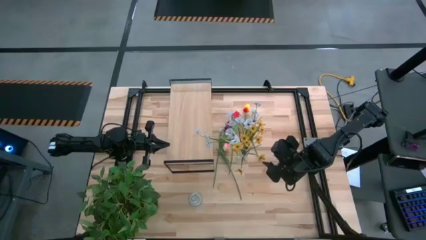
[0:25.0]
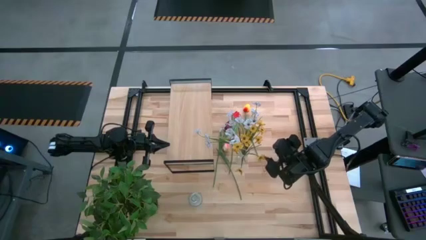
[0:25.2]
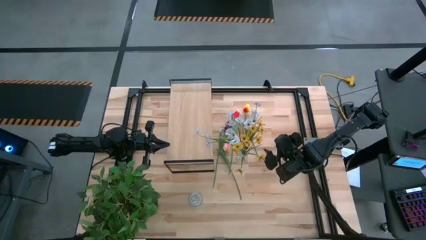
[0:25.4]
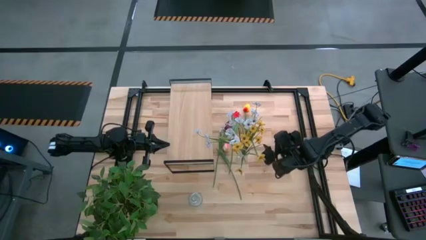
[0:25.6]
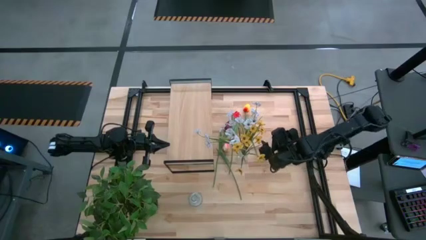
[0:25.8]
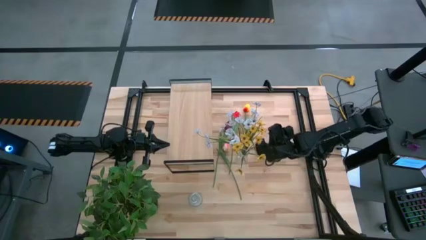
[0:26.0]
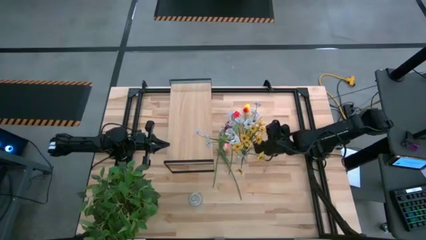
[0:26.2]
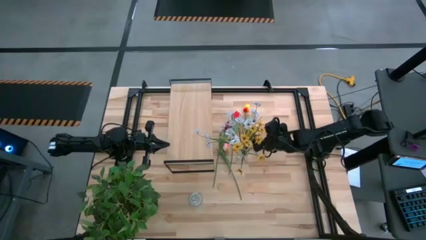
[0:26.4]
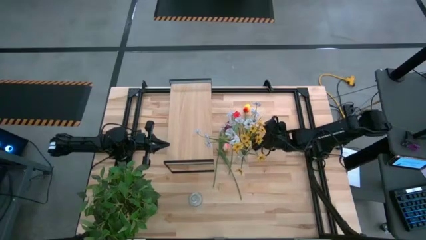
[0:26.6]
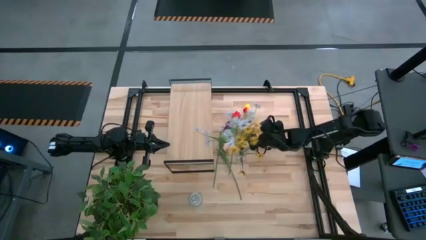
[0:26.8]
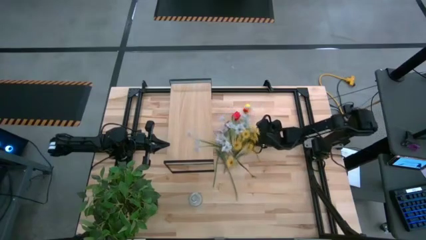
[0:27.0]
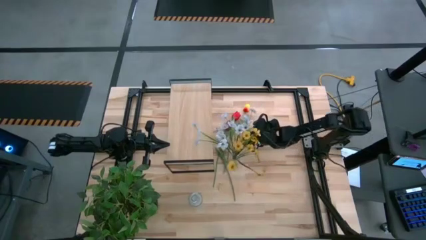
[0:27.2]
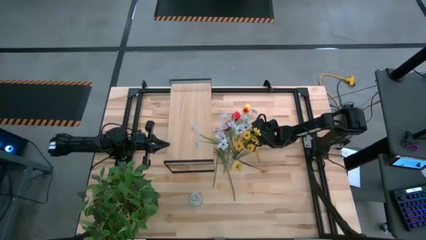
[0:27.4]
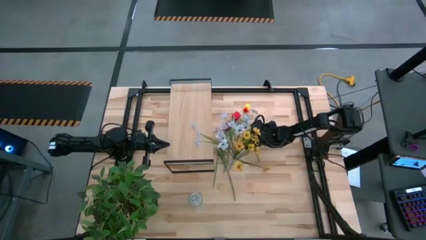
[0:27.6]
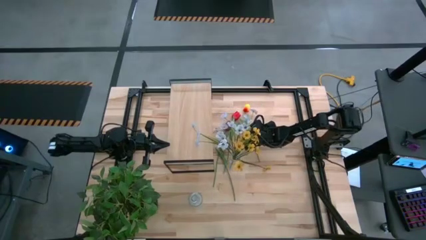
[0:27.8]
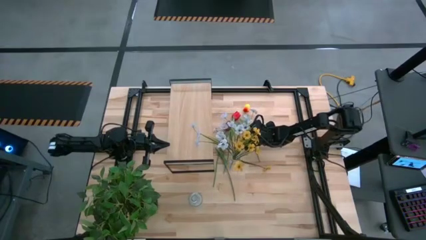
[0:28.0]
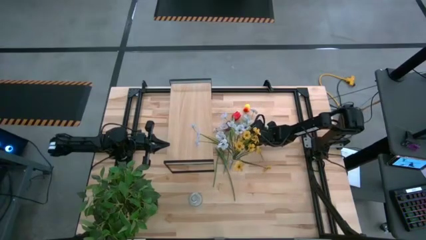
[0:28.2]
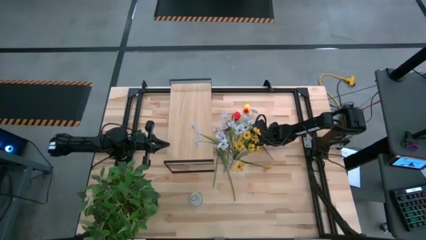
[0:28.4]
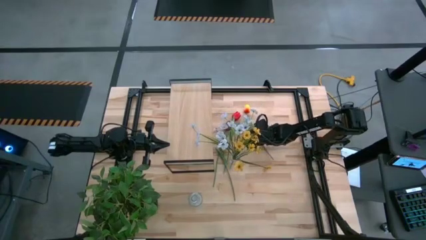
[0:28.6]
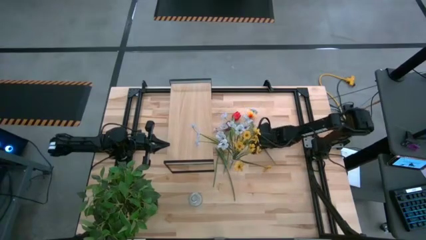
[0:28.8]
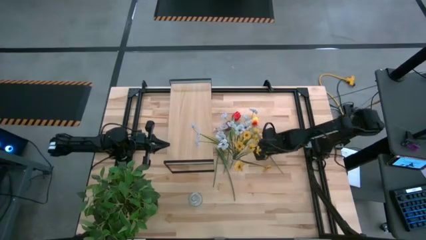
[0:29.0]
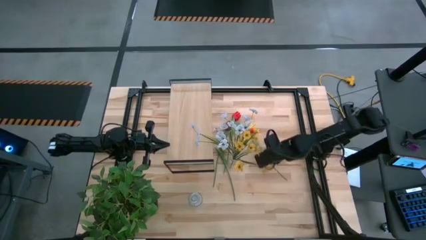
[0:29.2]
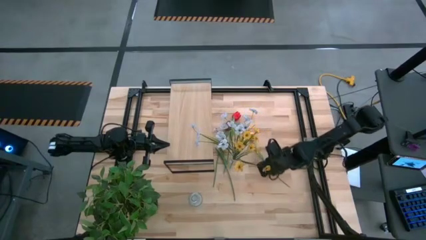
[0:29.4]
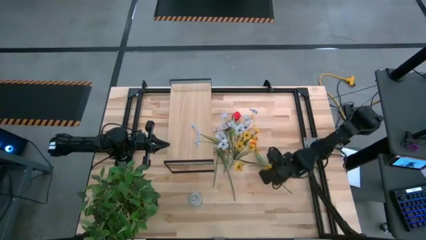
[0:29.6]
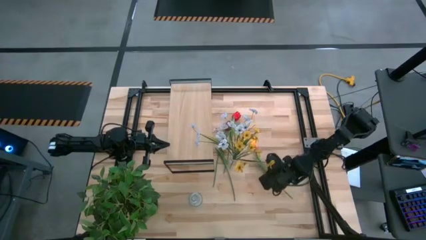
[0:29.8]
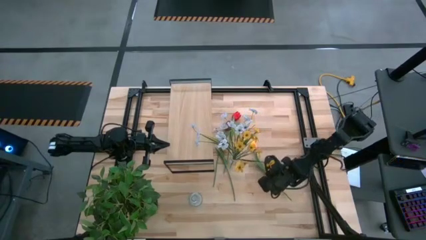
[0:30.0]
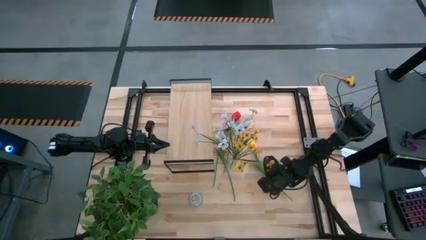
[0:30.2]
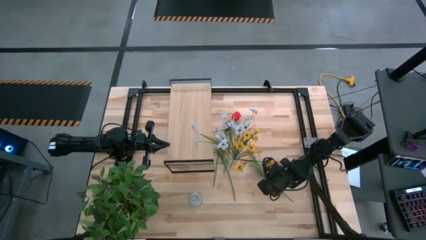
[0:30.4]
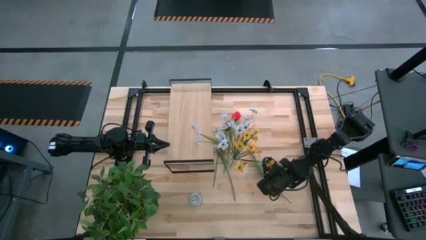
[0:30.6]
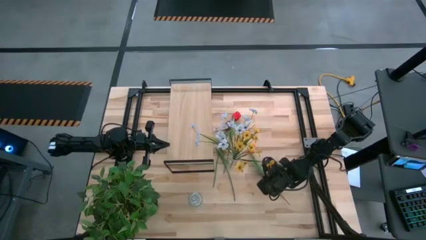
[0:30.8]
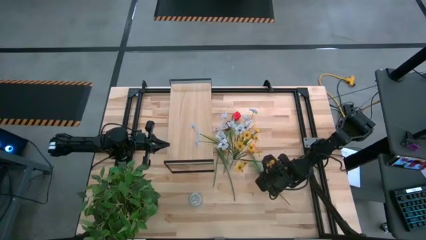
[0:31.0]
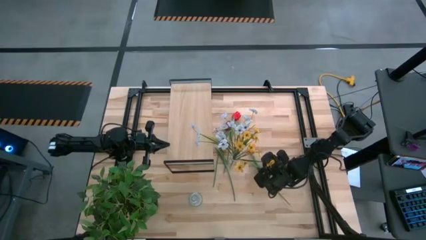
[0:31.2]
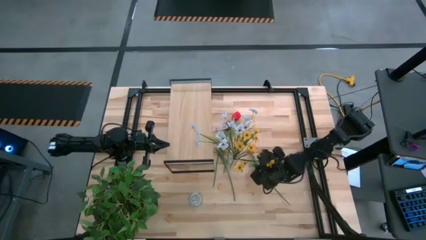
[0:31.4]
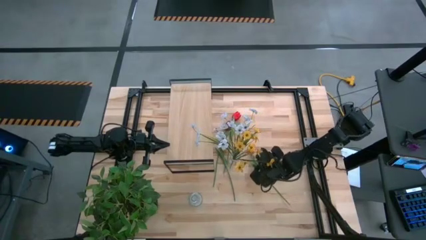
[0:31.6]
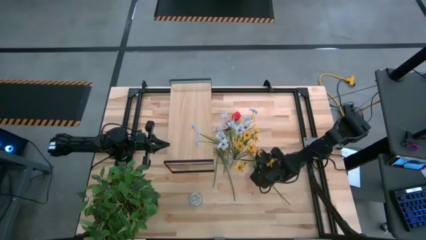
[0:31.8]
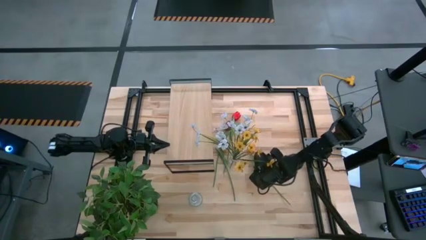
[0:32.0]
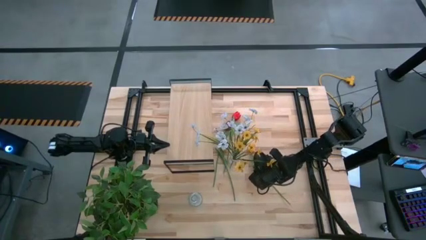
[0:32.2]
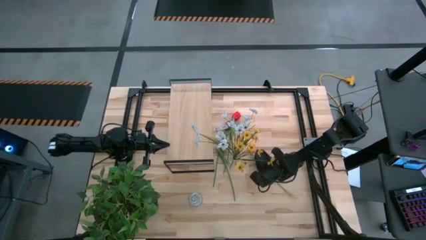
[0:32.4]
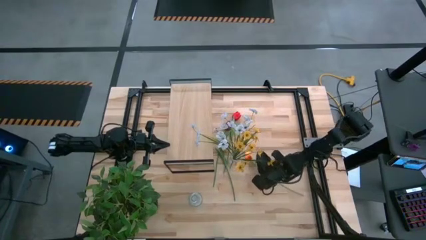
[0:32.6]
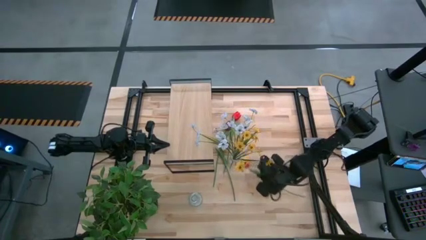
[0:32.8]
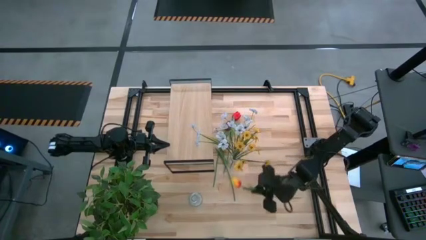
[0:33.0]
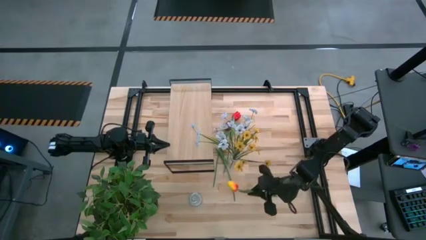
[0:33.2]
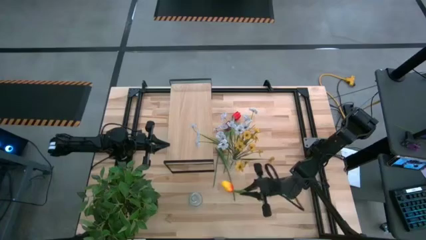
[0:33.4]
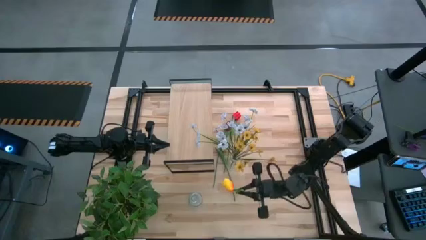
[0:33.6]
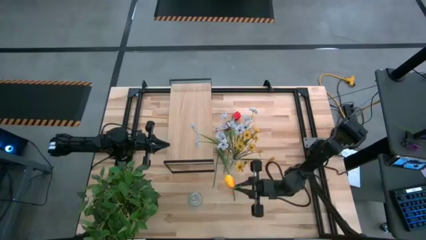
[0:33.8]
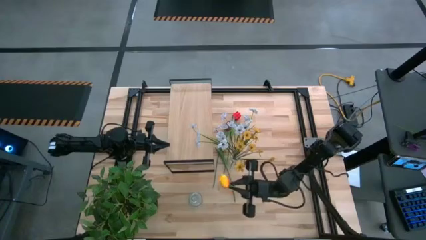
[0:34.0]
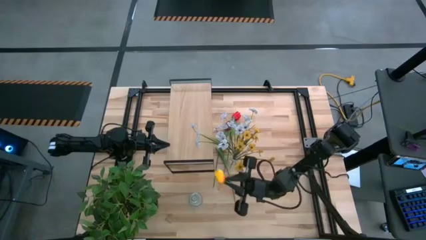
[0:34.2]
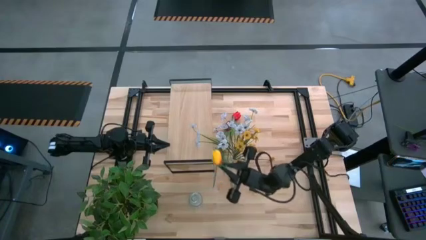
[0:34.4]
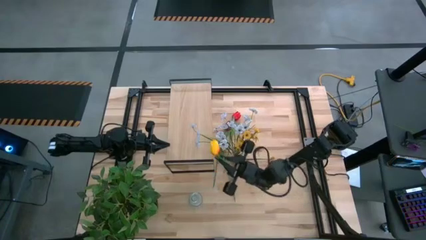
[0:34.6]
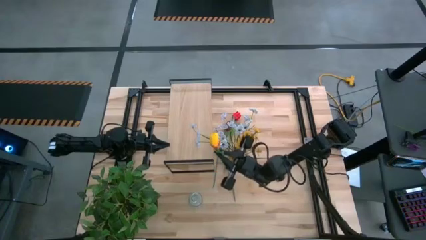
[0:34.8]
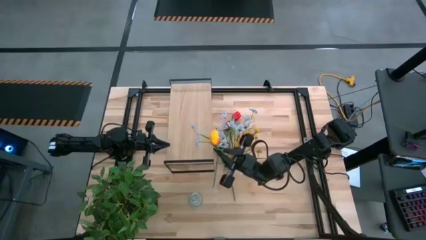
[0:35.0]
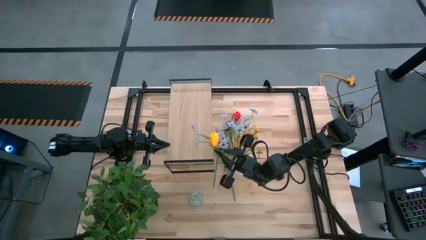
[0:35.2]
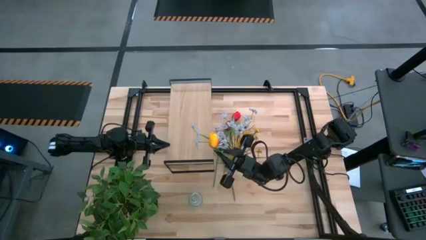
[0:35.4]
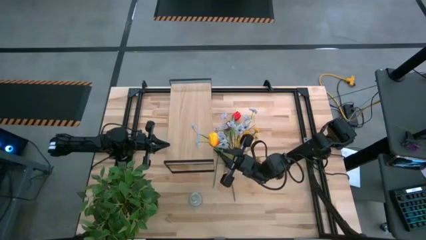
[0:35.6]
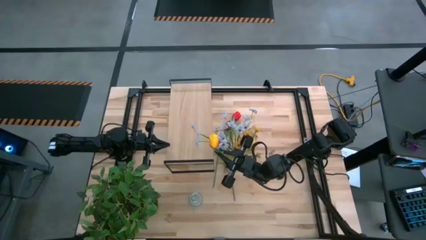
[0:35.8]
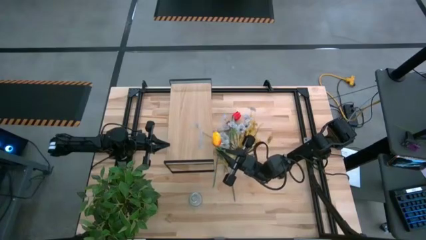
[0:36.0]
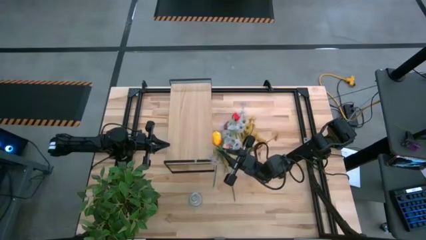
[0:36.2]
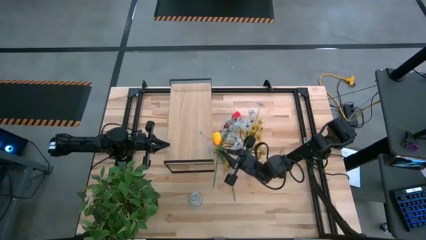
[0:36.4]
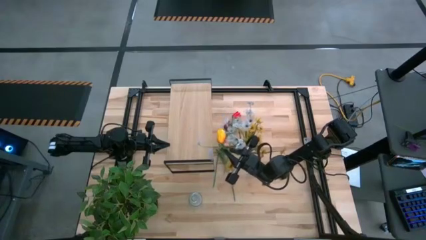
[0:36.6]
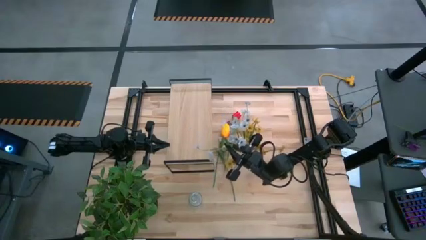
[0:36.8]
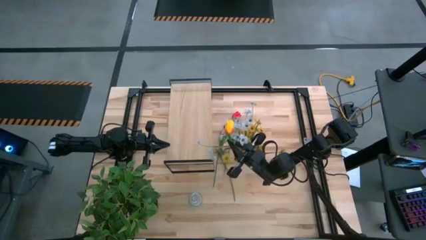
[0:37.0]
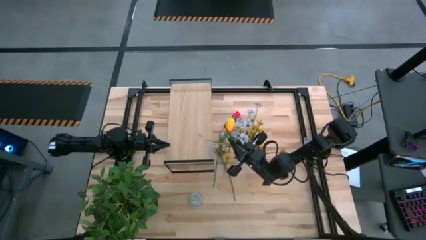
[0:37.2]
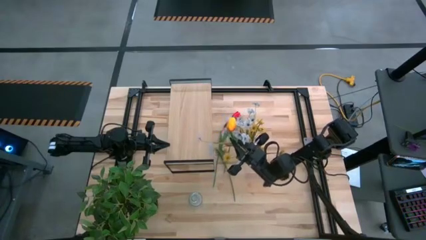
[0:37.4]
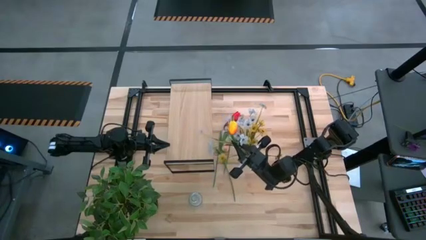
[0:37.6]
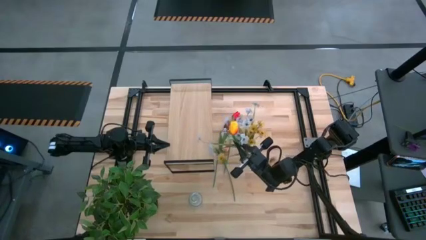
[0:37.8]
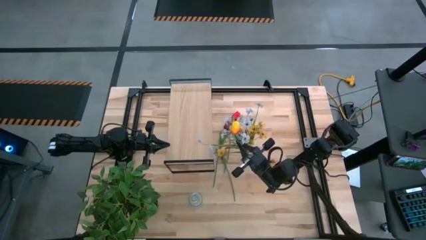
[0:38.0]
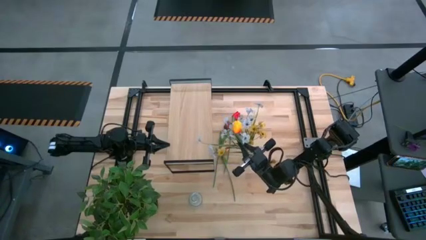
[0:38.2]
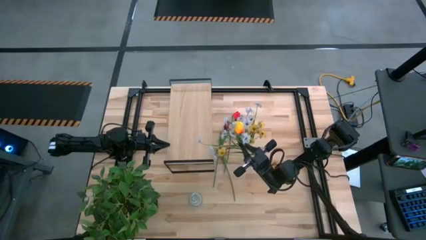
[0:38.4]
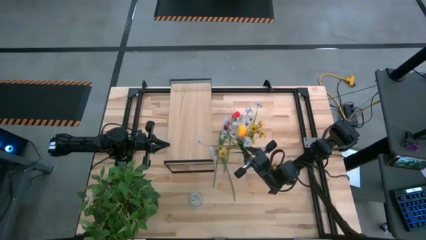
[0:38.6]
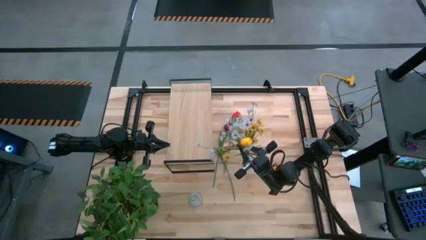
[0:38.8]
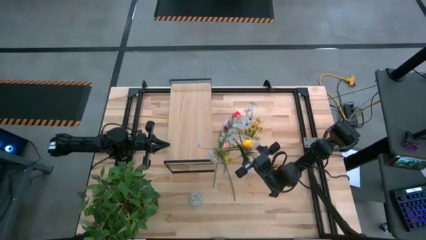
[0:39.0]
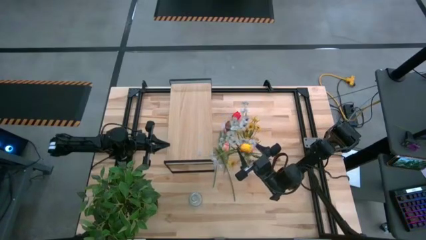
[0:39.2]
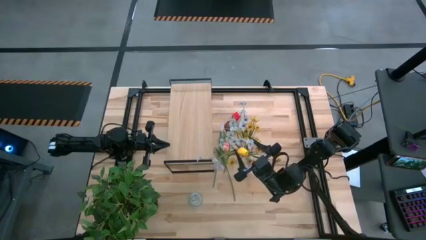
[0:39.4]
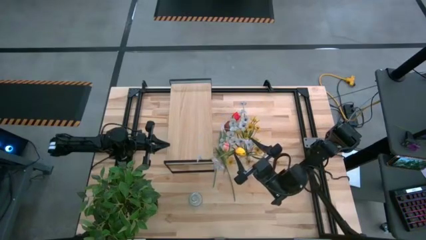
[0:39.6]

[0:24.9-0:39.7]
Task: Pick and place flowers into a vace then onto a shelf
Put the light yellow flower into the top transparent vase
